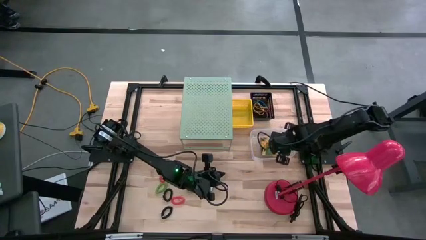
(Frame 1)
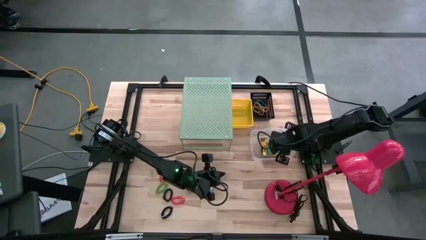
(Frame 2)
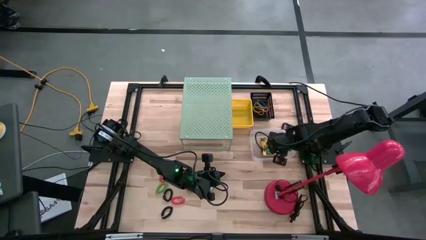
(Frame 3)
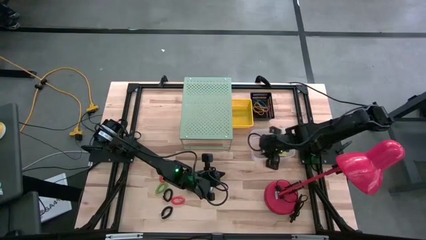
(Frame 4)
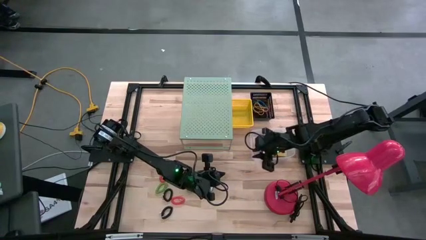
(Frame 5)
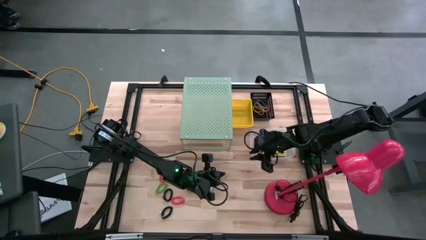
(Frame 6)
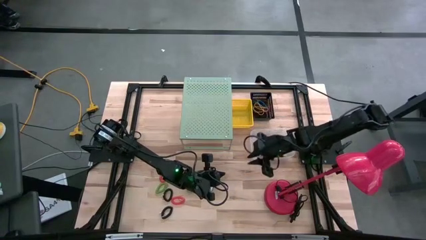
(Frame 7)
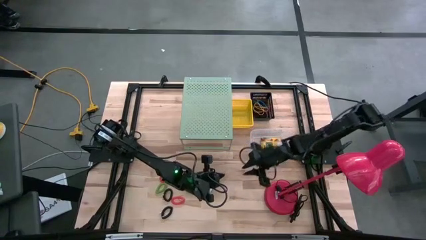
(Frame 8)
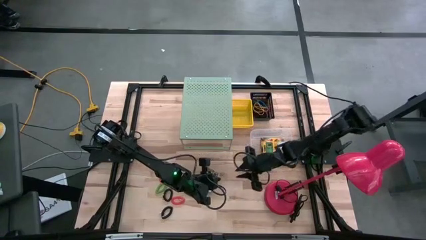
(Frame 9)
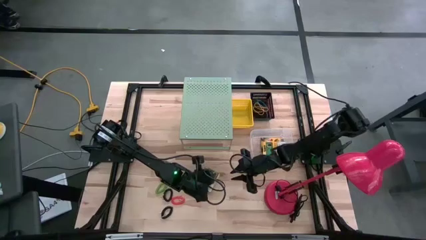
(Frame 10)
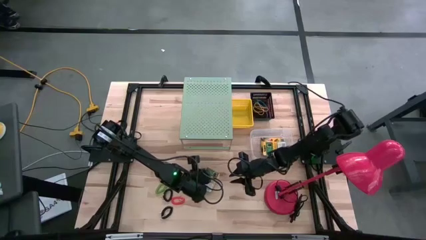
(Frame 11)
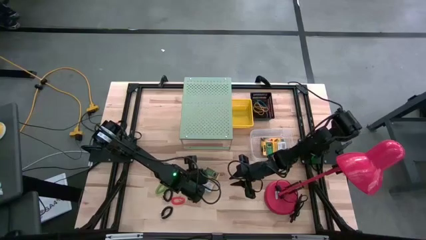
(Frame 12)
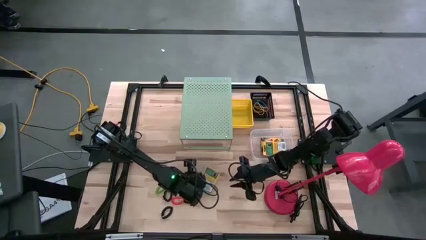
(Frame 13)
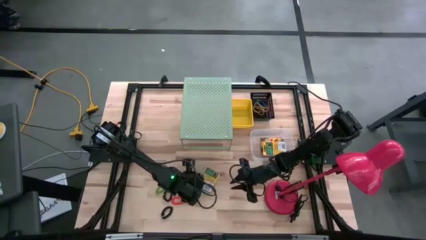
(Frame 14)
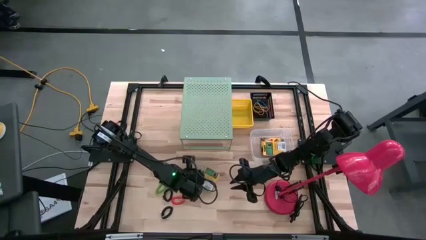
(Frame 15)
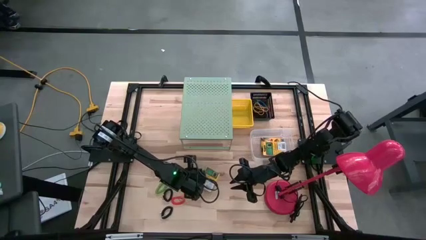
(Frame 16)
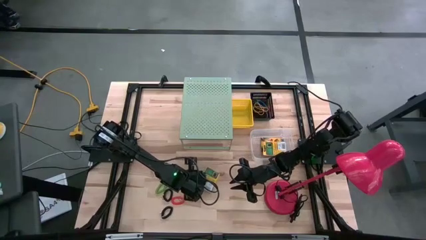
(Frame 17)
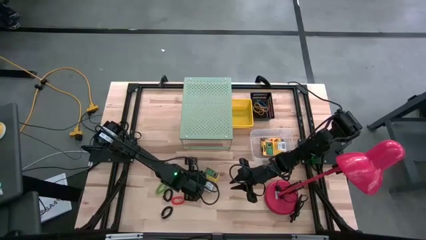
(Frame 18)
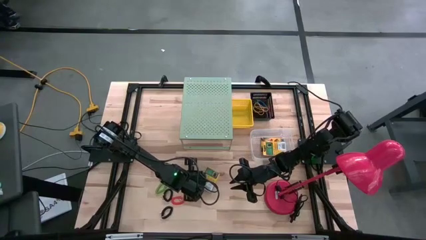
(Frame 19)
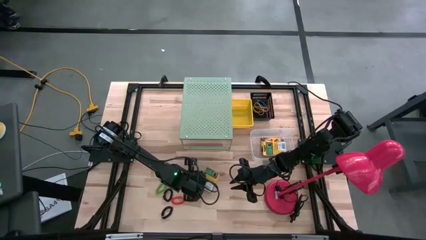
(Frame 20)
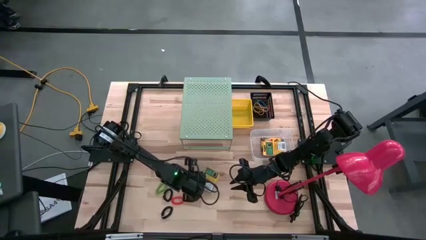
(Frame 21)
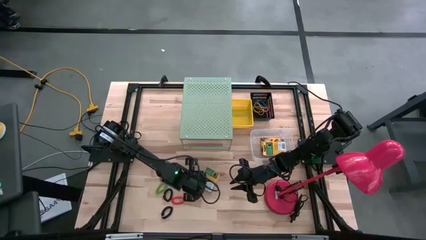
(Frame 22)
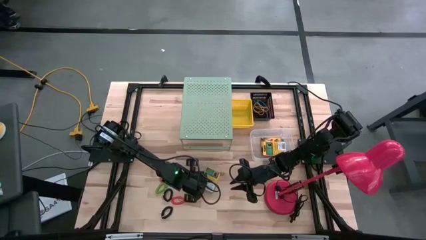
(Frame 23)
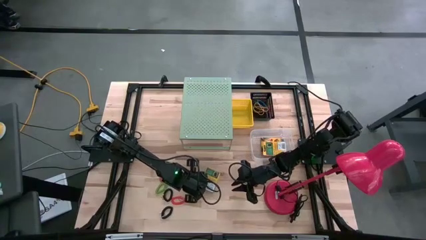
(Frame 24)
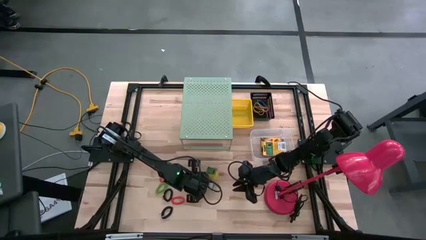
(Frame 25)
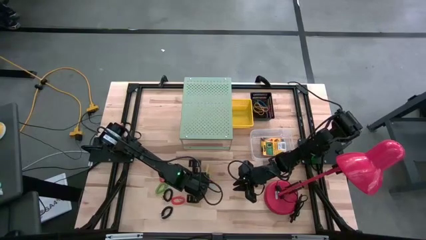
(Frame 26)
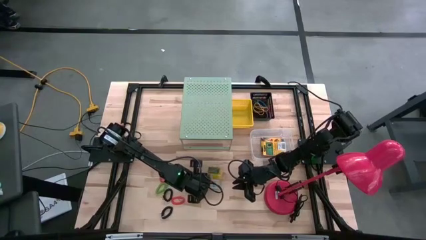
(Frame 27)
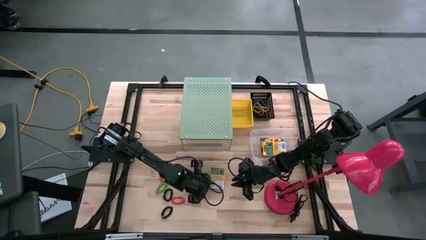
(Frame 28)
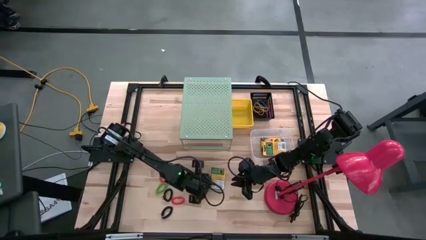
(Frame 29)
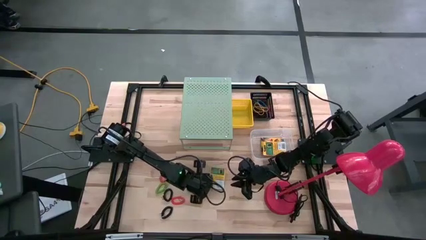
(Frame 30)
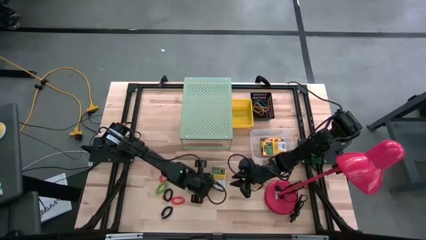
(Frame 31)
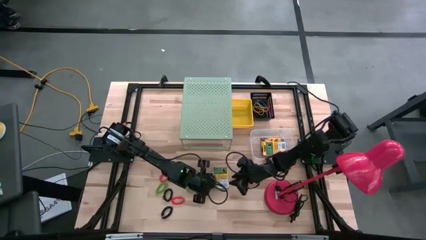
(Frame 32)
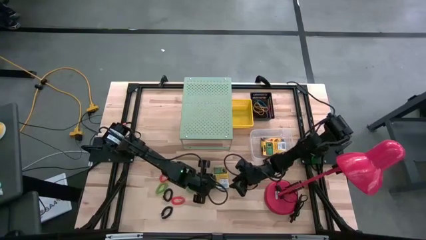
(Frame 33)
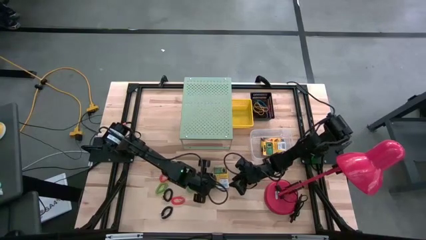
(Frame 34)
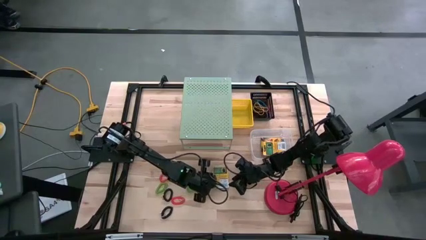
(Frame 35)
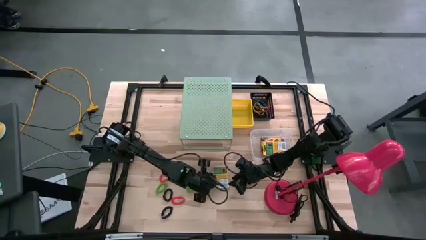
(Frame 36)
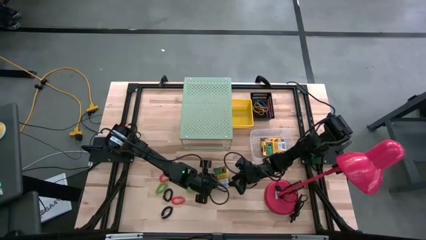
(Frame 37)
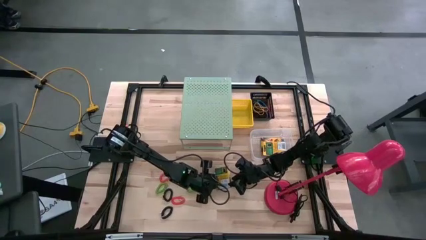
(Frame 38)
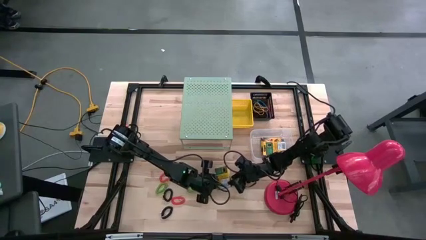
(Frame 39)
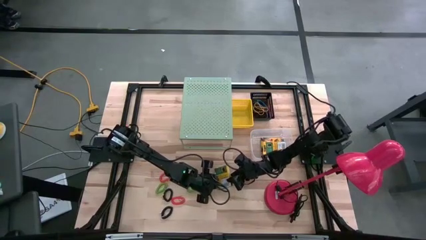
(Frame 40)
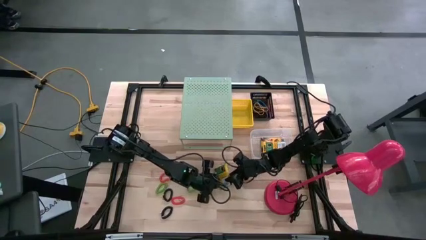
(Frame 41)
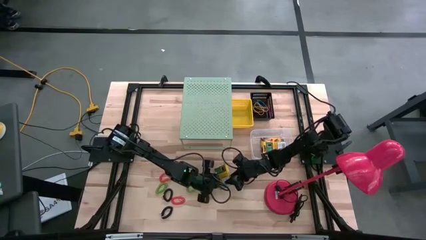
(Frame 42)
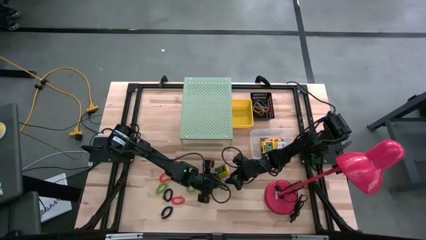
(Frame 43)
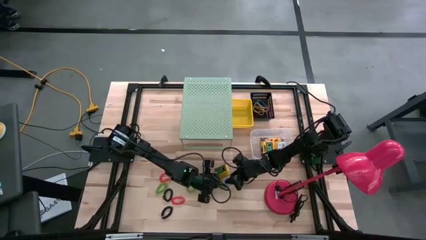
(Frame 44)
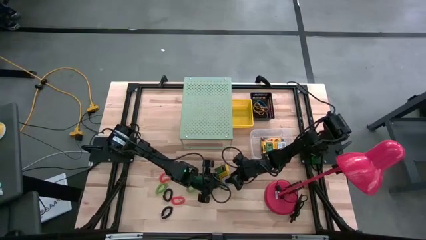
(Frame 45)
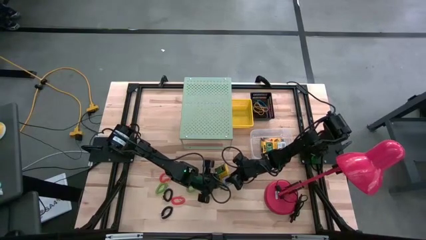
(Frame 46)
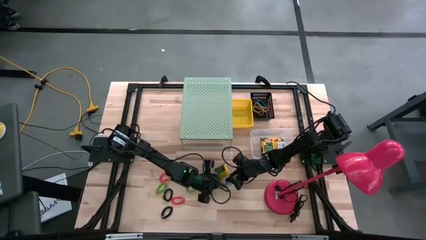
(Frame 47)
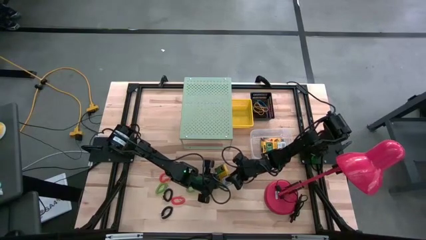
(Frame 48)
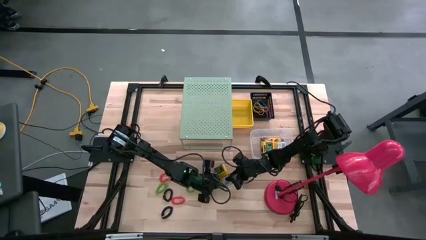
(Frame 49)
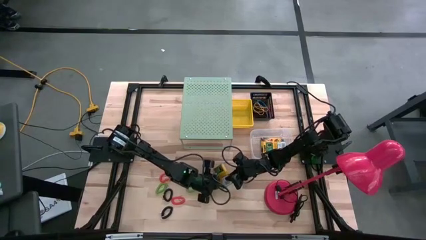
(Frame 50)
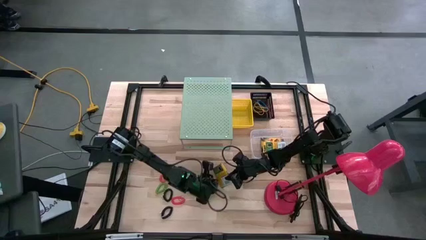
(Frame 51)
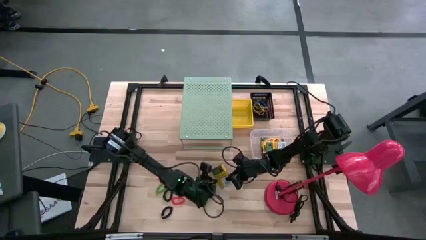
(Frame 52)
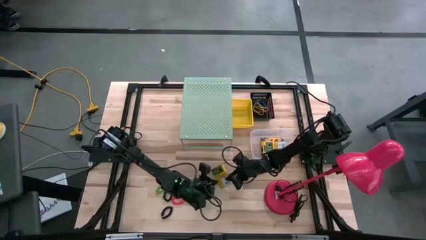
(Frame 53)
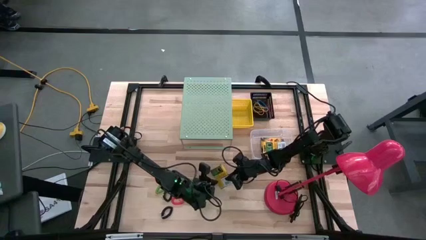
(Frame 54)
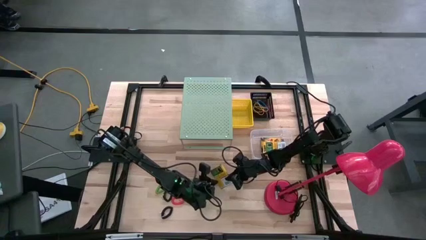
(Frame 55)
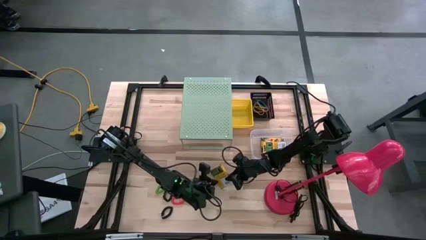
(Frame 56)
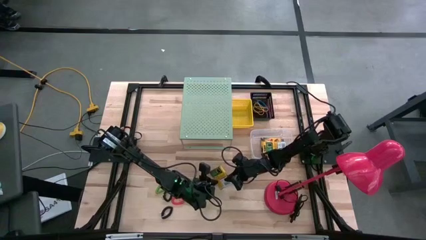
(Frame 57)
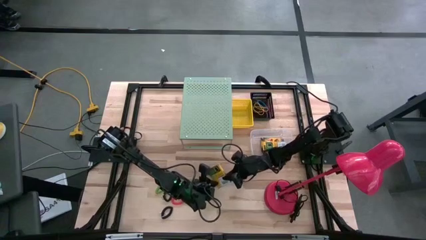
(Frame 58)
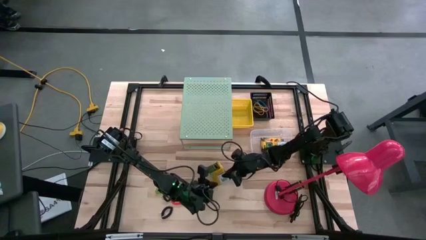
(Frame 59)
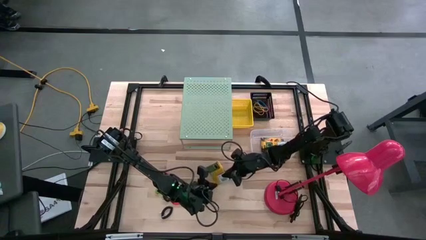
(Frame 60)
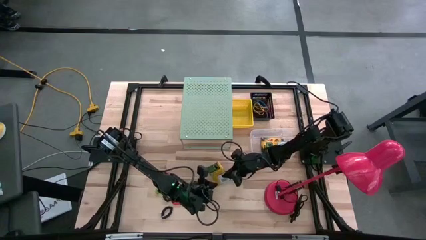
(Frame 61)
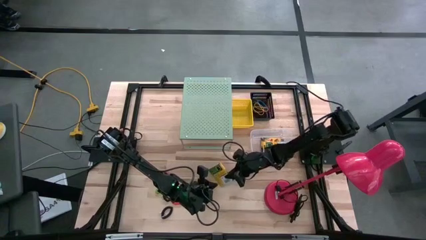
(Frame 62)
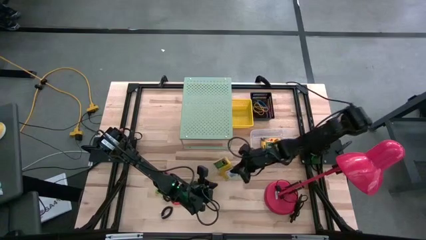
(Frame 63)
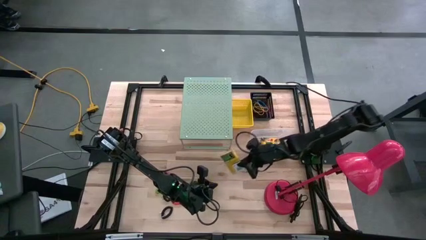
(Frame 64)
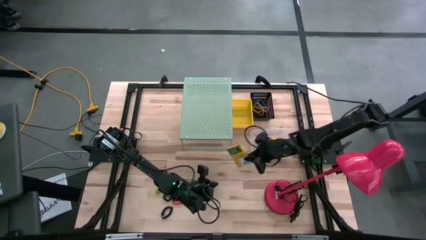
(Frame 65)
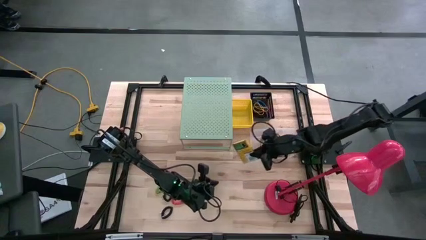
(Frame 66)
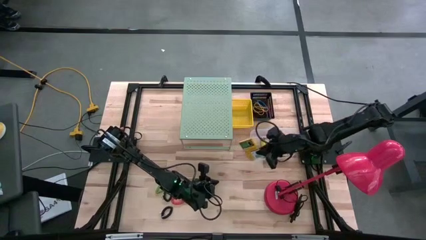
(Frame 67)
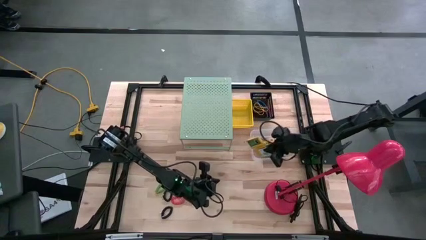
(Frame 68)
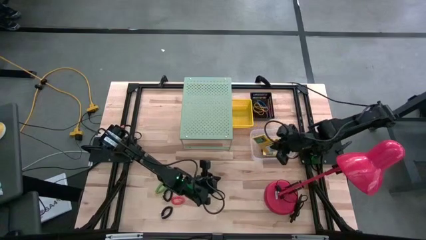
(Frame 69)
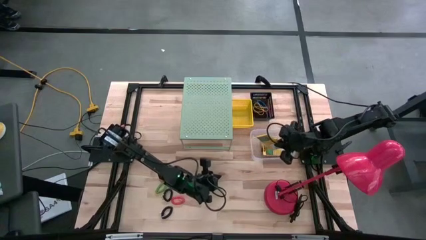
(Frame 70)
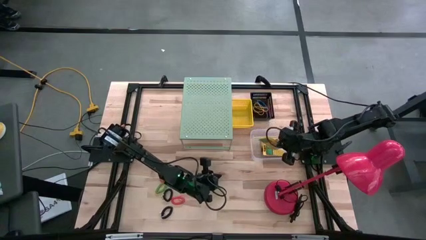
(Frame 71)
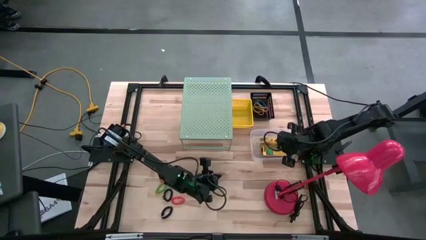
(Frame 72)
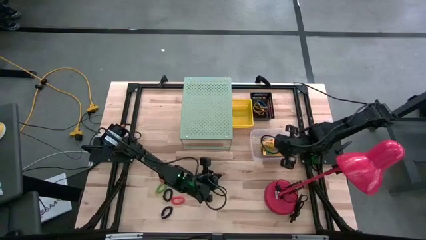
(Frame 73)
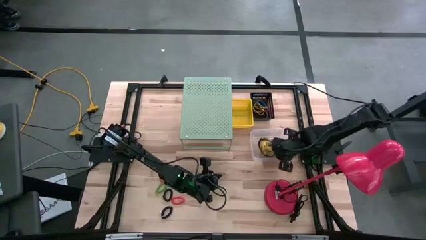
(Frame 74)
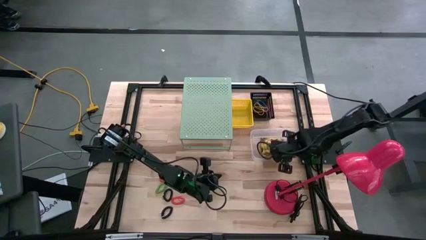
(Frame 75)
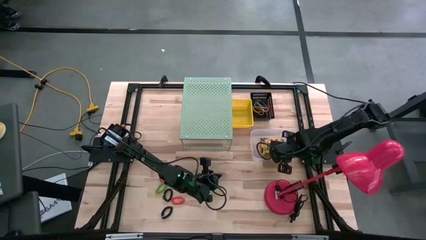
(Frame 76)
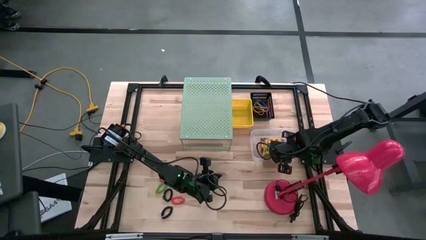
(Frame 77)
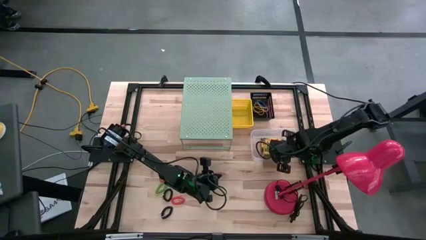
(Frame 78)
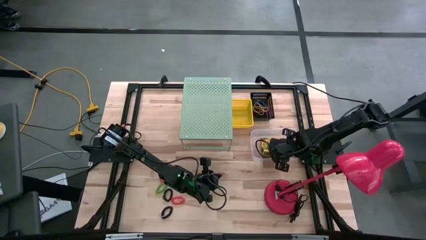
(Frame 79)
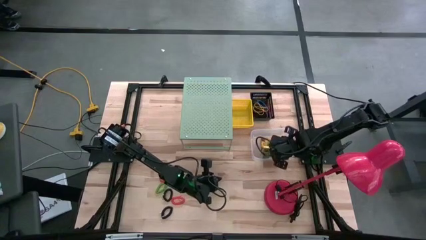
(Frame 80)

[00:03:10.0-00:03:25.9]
Task: Pick & Place Office Desk Supplies
Put the crayon box into the transparent bin
